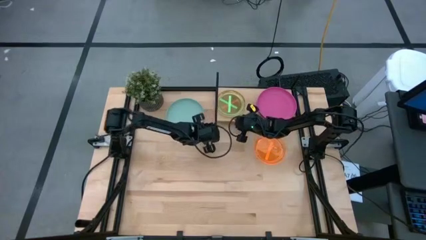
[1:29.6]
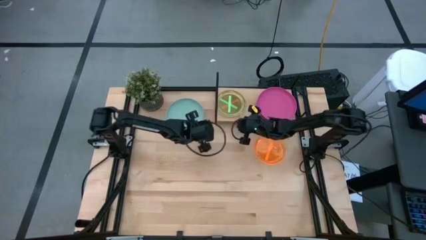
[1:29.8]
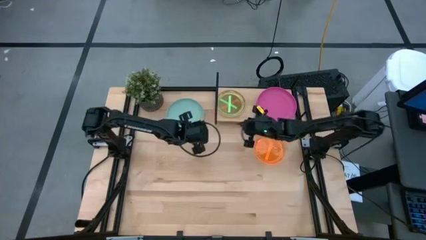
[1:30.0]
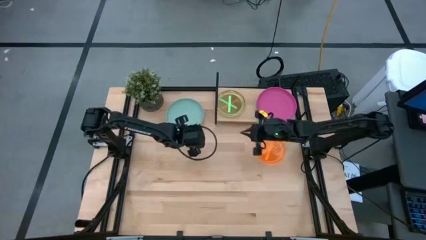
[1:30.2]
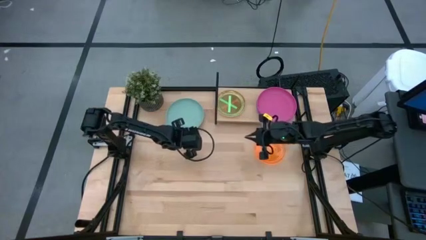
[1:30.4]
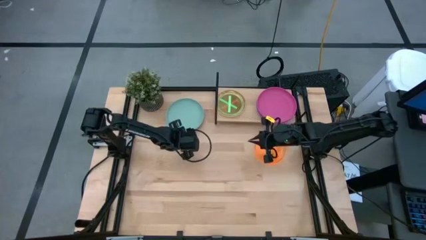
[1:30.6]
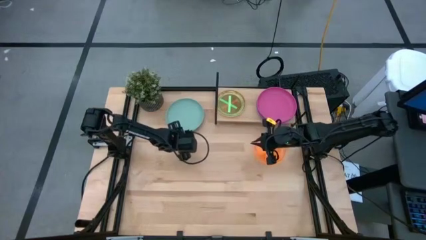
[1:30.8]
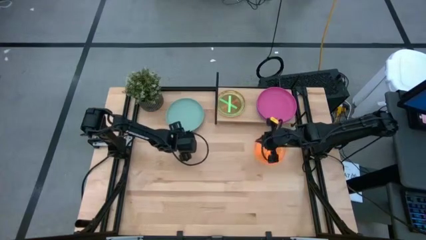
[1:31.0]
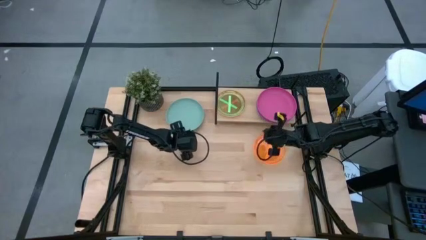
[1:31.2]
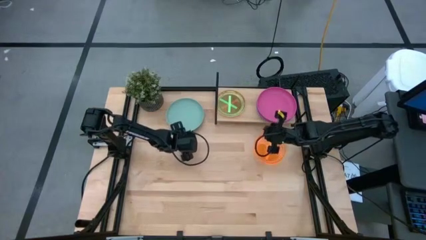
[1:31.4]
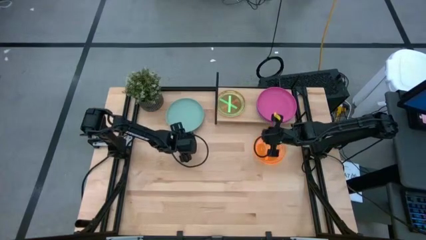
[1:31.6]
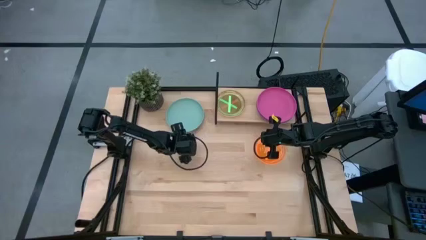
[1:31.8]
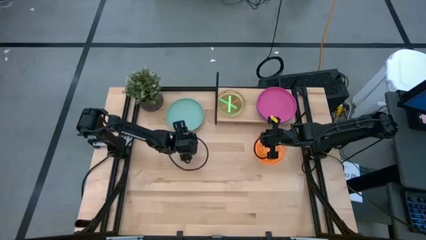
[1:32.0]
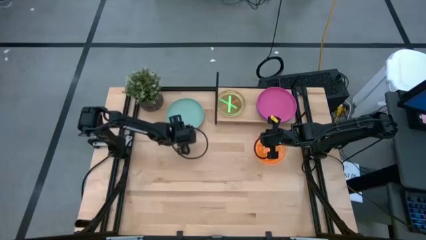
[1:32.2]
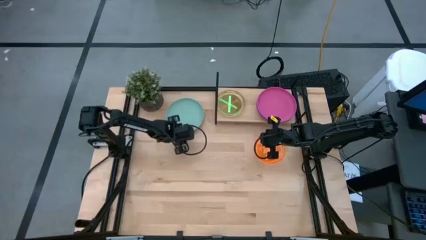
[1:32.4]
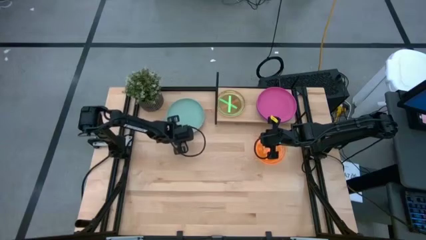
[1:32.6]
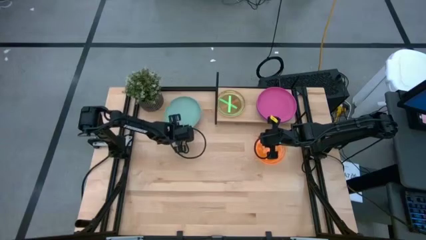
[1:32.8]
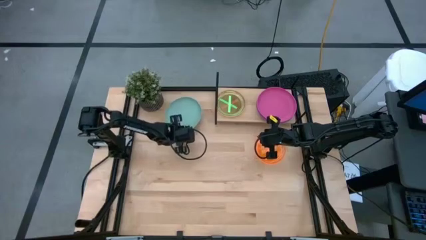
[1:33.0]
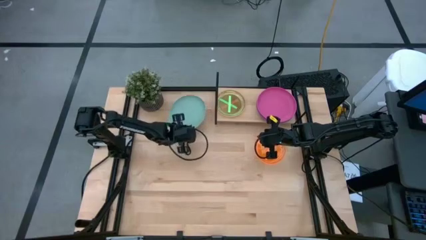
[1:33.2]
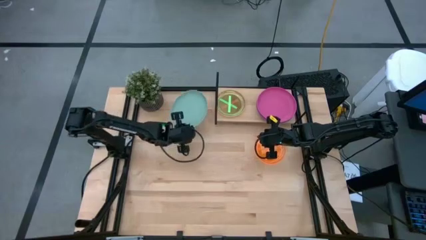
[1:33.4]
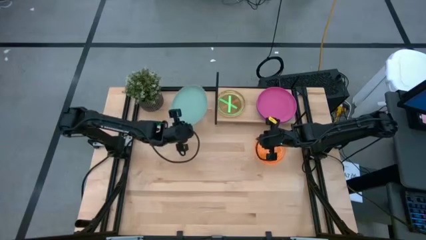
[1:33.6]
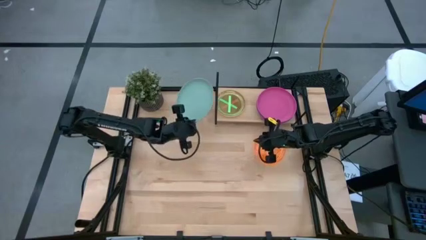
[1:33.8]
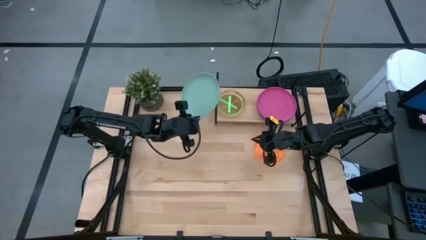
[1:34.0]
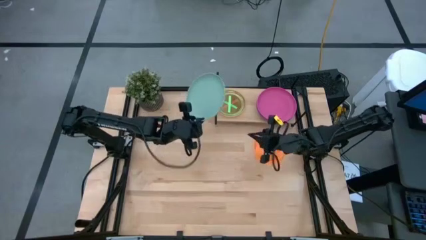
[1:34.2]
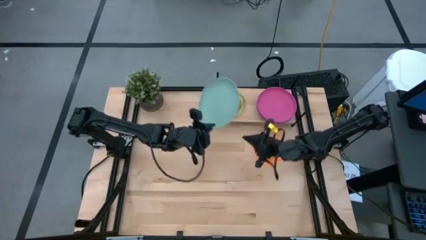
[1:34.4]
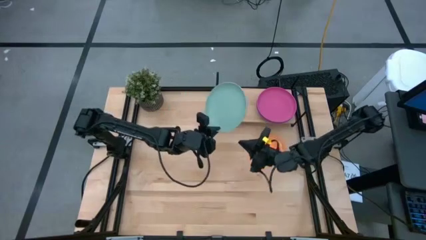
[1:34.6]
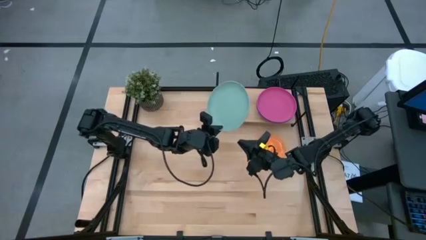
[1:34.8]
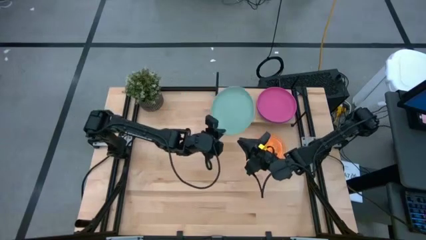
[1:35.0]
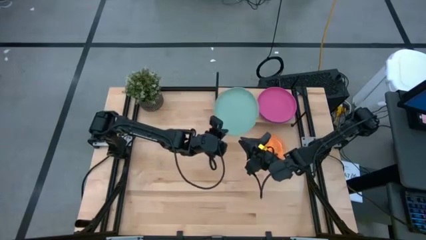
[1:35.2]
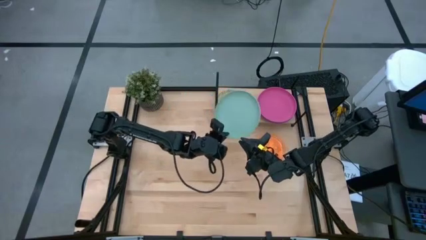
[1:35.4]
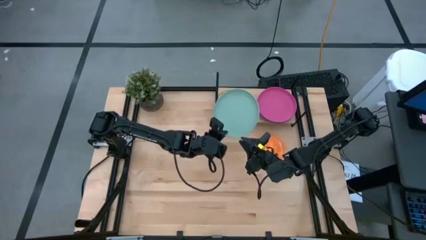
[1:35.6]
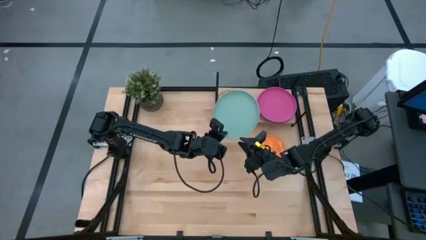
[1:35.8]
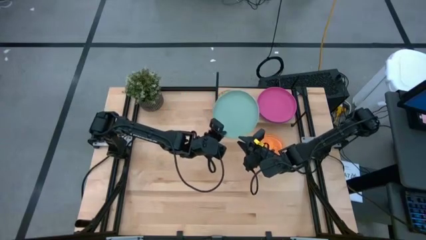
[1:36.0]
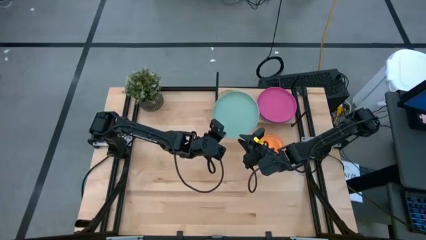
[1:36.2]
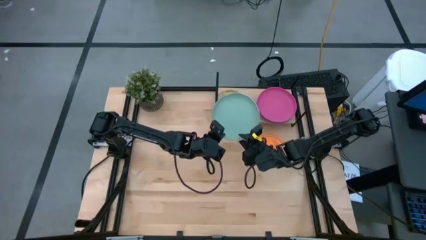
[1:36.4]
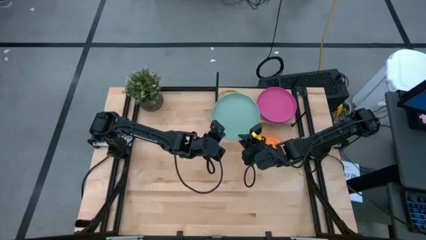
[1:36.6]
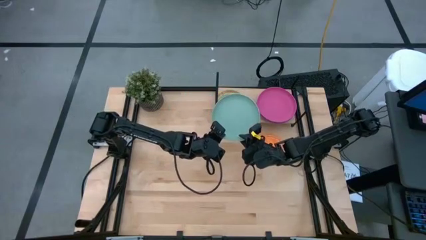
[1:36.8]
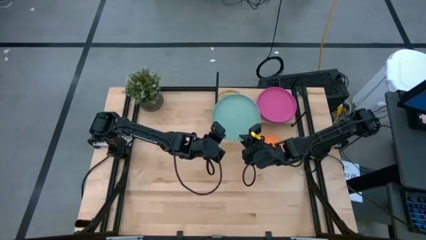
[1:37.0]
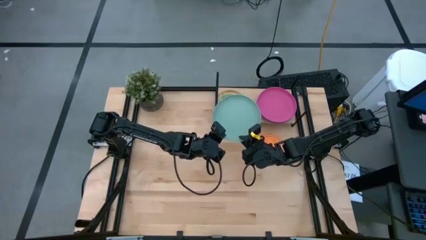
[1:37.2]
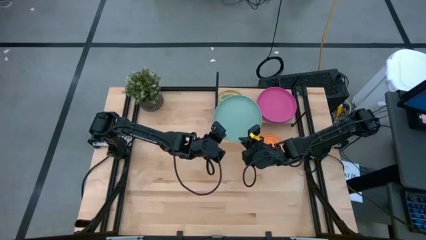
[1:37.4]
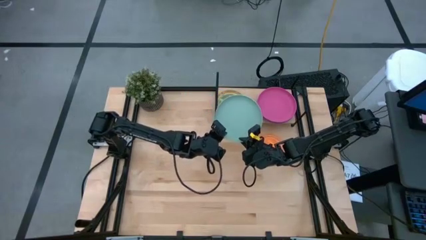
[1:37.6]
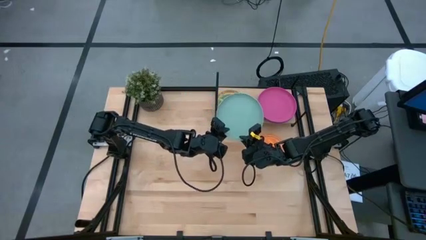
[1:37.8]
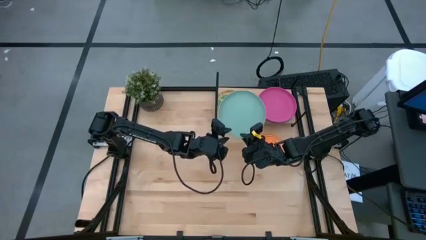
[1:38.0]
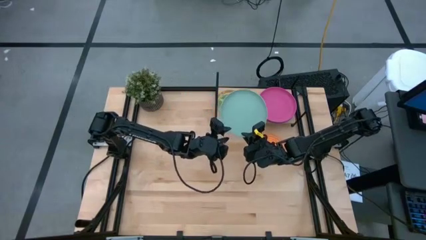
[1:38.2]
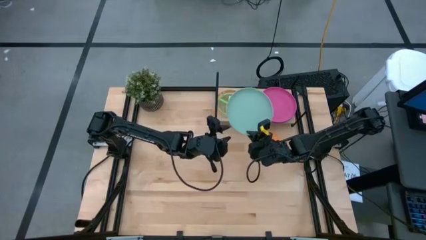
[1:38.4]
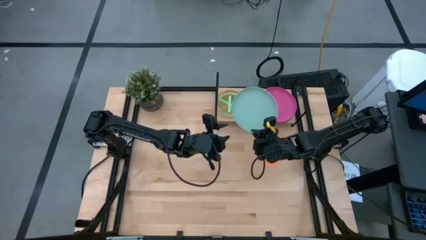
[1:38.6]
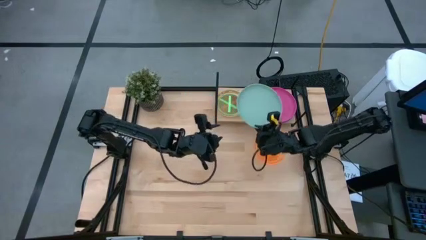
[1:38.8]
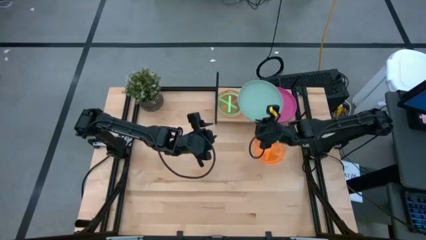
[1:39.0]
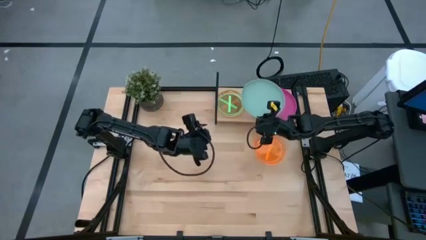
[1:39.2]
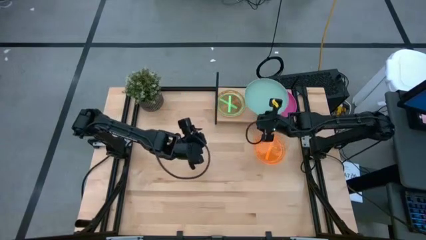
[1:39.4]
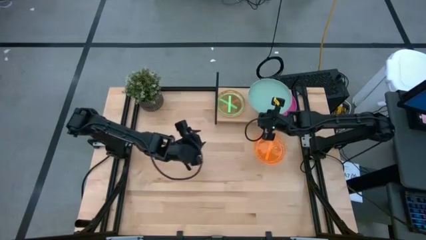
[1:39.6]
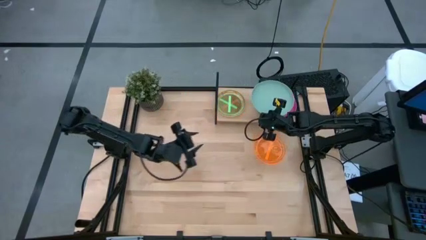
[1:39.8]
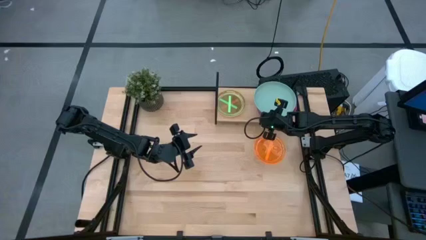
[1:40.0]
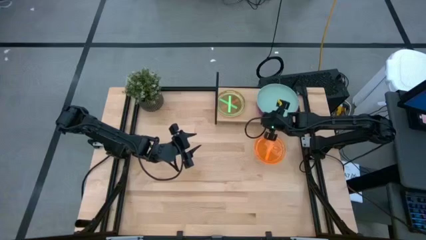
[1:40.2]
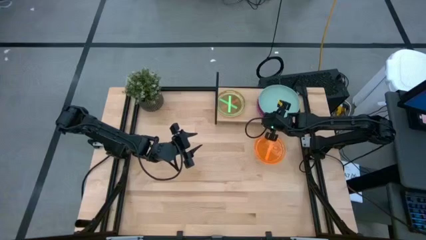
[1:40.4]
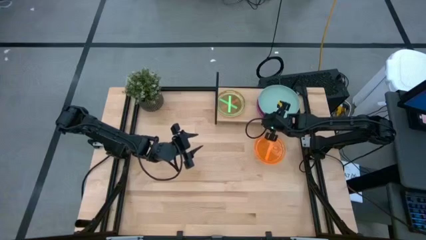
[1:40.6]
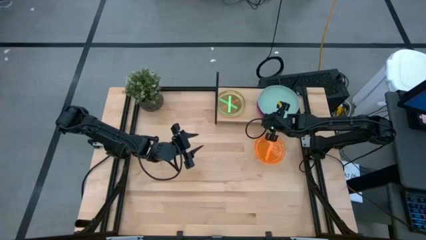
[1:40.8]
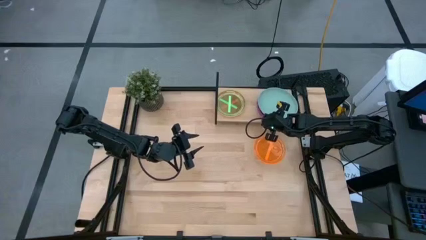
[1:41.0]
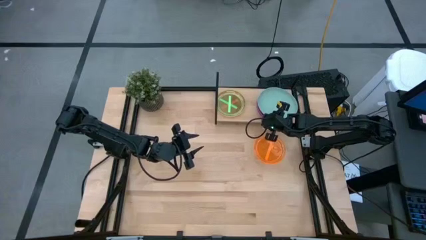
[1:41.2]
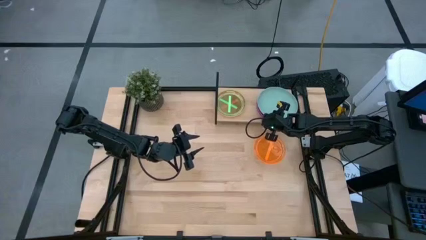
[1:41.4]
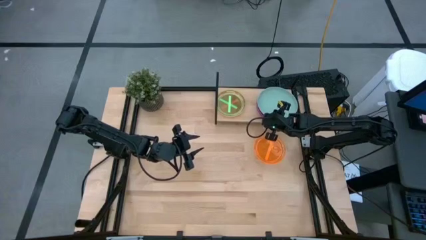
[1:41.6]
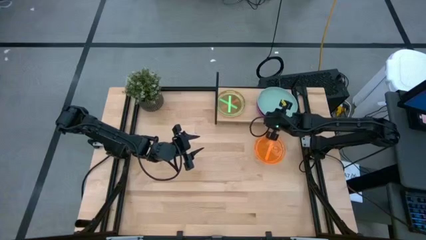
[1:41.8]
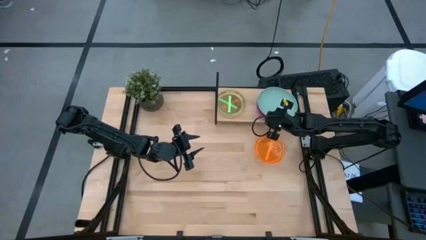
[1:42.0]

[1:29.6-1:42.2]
Task: Place and stack plates onto a shelf
Stack the big light blue plate on top of the big pink plate
